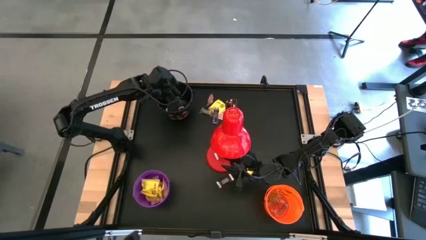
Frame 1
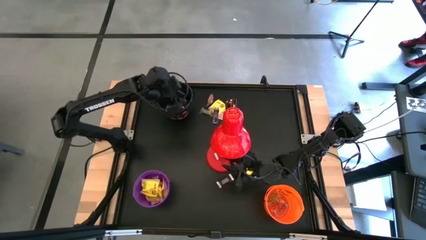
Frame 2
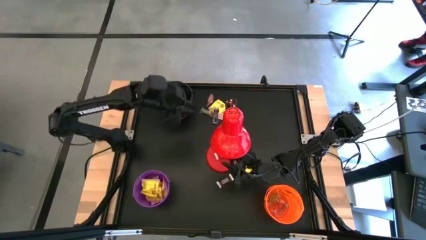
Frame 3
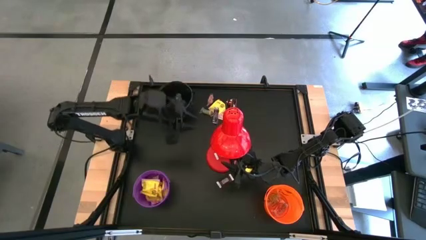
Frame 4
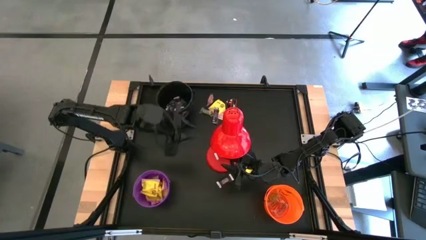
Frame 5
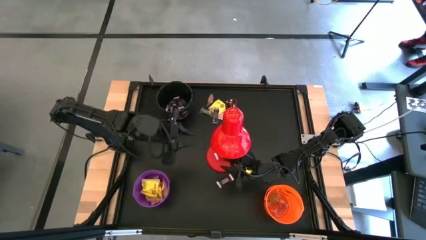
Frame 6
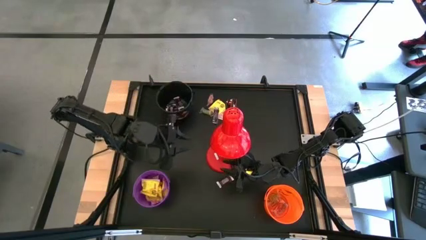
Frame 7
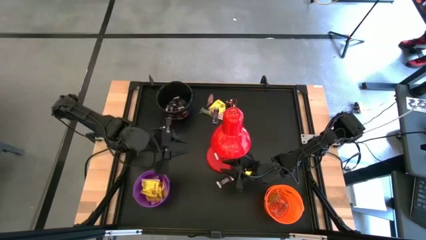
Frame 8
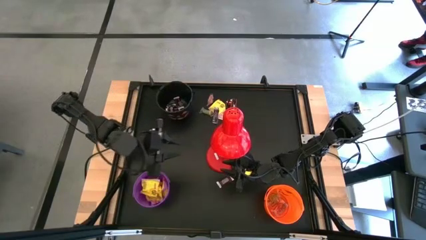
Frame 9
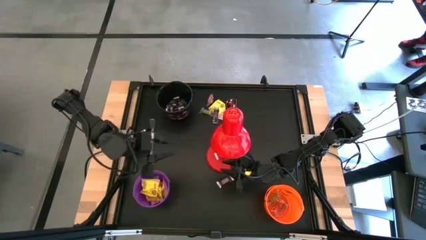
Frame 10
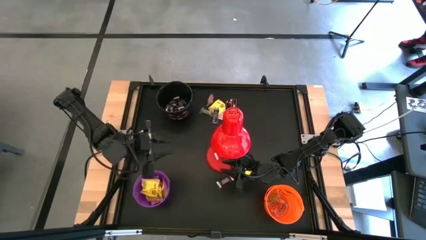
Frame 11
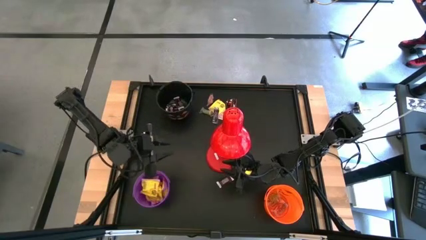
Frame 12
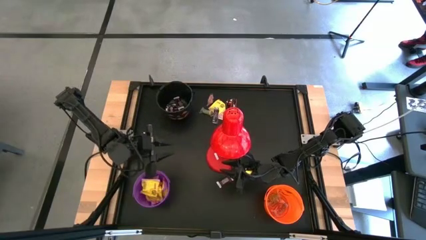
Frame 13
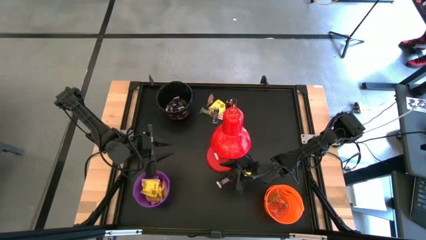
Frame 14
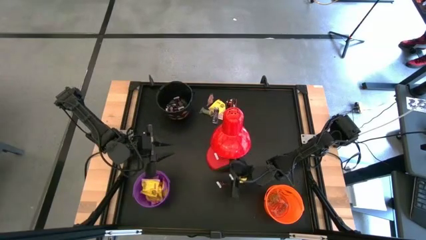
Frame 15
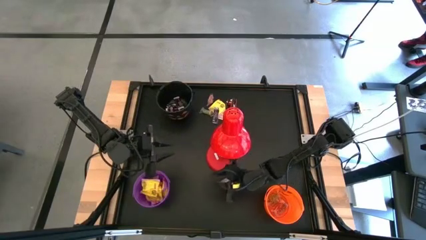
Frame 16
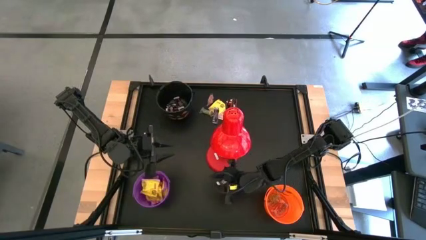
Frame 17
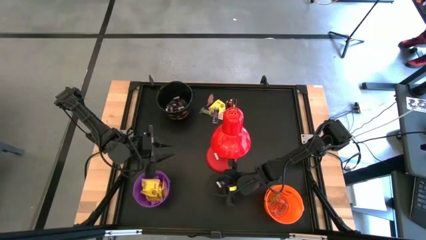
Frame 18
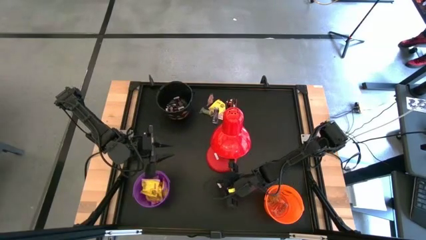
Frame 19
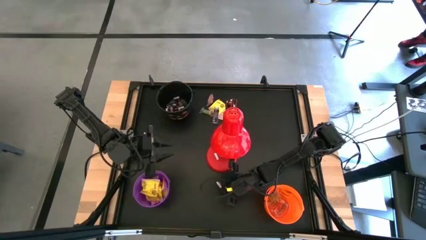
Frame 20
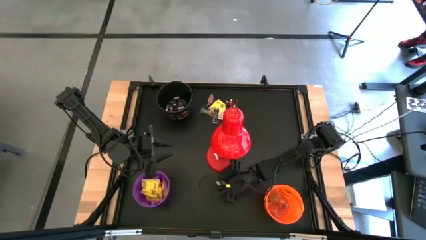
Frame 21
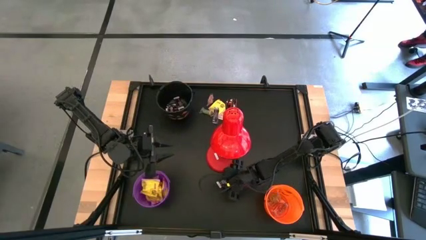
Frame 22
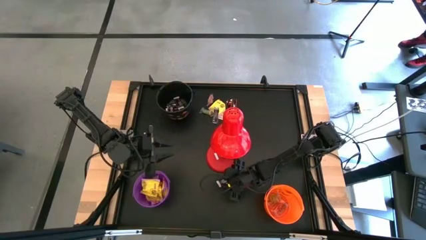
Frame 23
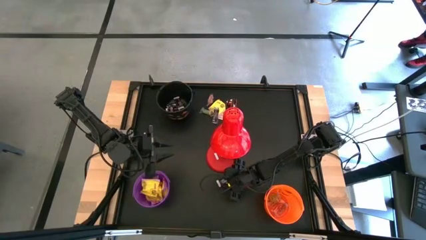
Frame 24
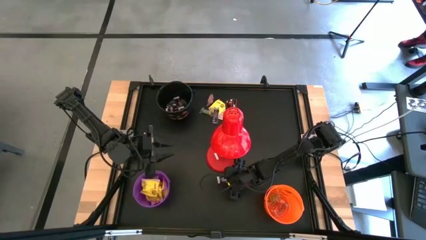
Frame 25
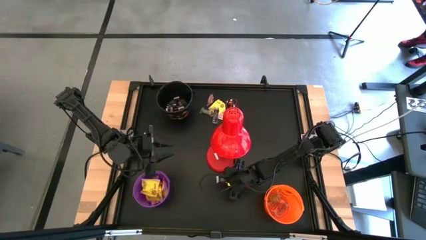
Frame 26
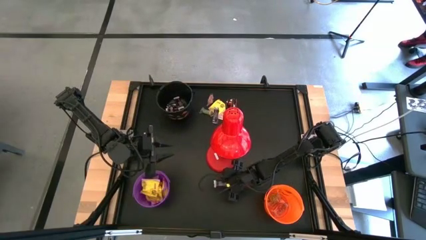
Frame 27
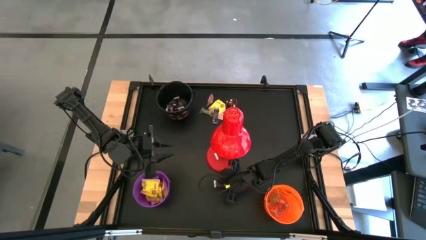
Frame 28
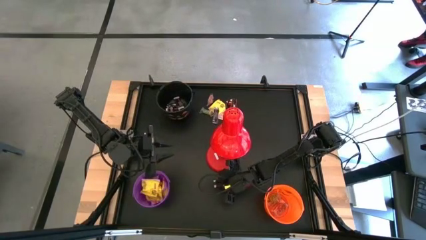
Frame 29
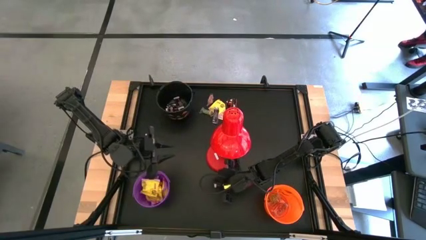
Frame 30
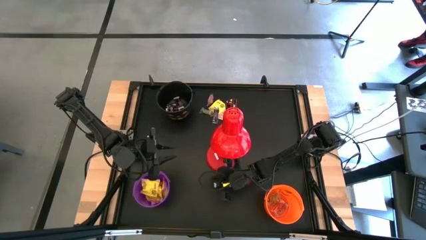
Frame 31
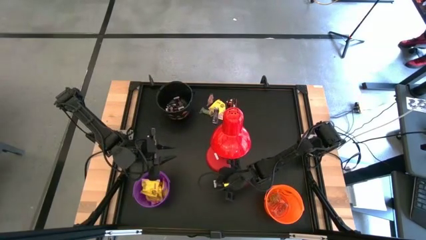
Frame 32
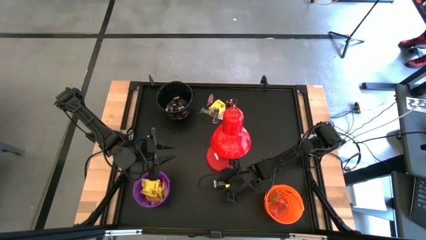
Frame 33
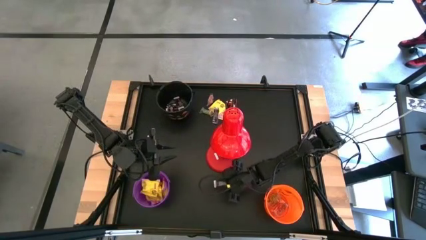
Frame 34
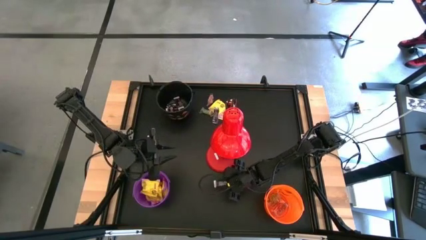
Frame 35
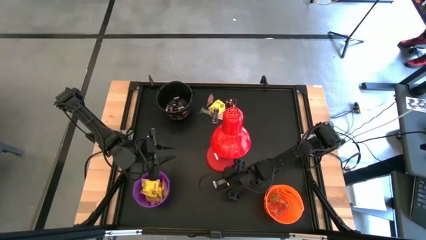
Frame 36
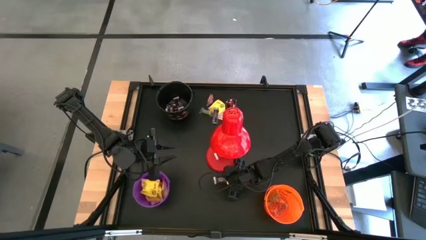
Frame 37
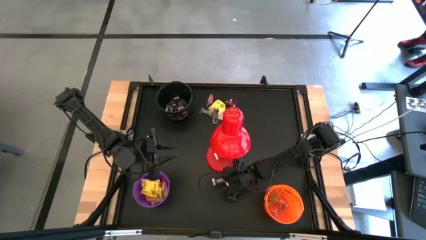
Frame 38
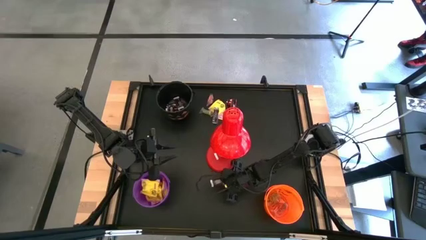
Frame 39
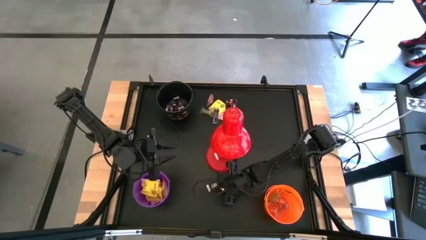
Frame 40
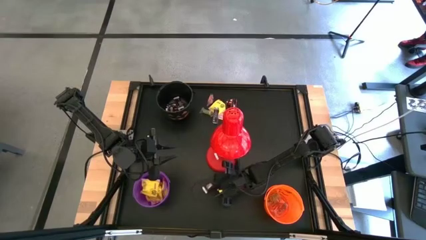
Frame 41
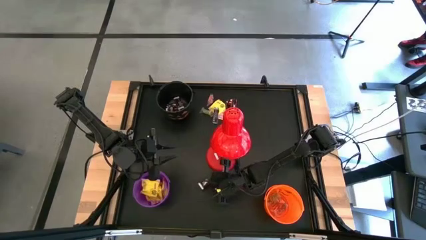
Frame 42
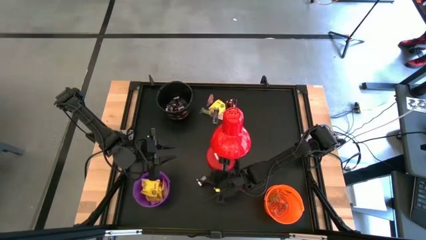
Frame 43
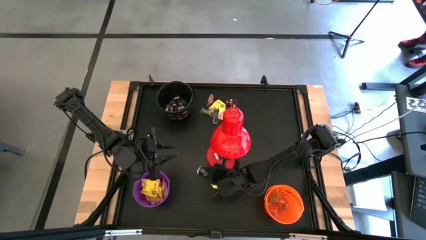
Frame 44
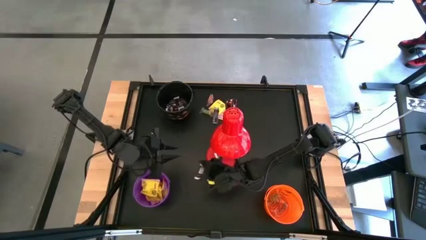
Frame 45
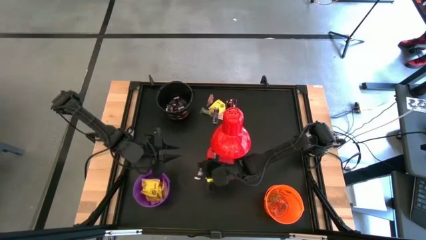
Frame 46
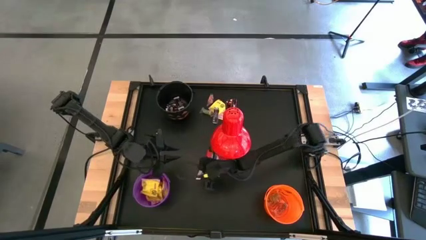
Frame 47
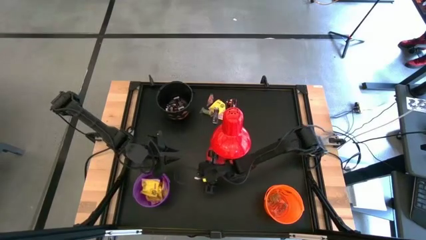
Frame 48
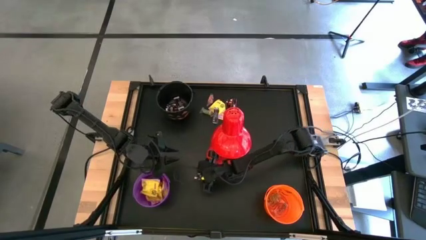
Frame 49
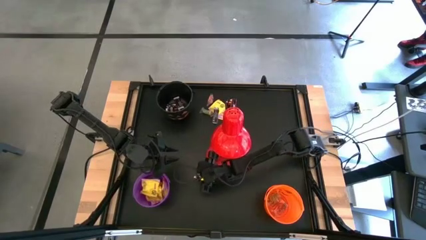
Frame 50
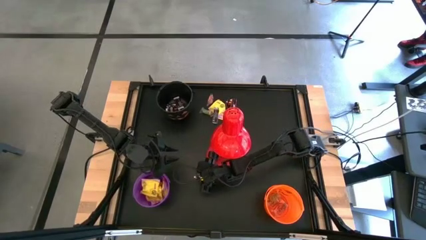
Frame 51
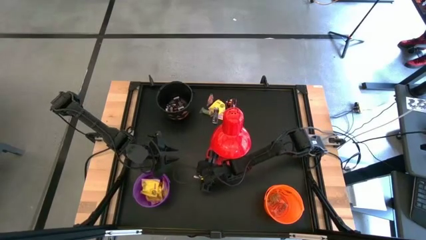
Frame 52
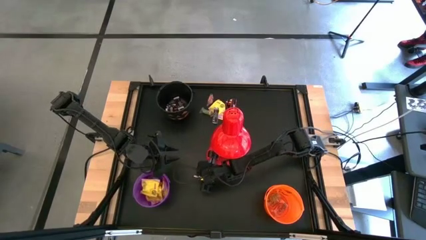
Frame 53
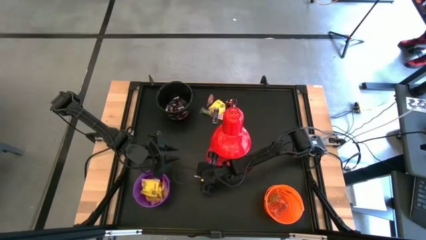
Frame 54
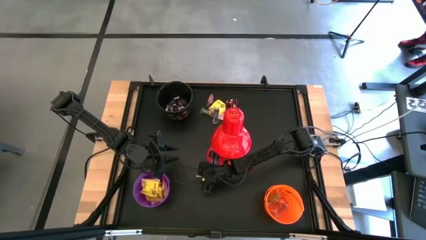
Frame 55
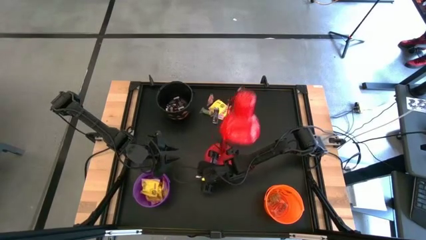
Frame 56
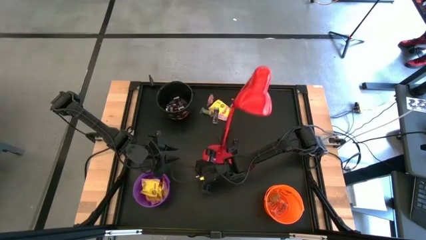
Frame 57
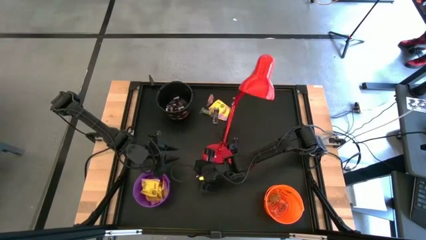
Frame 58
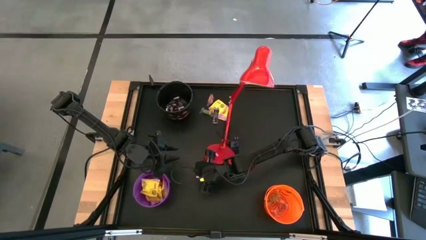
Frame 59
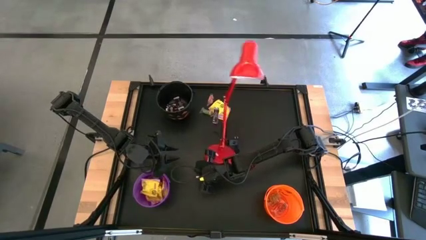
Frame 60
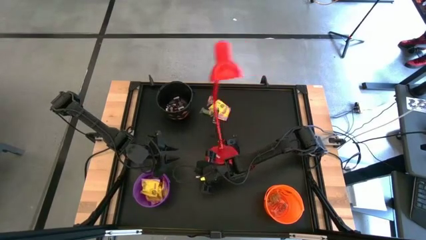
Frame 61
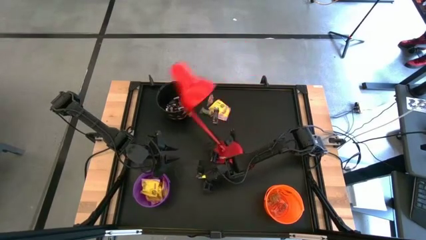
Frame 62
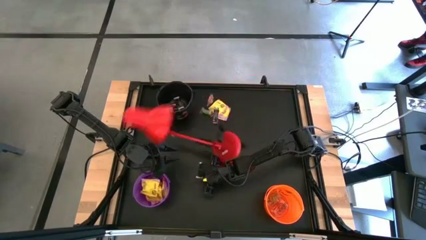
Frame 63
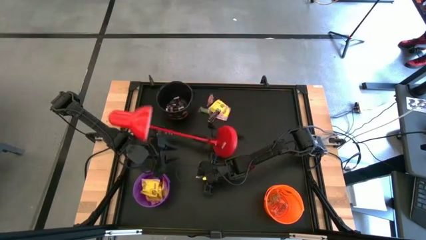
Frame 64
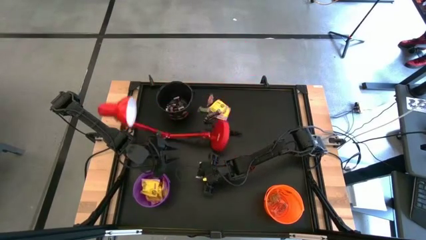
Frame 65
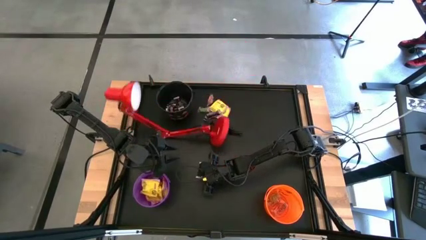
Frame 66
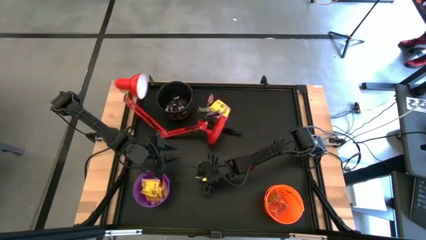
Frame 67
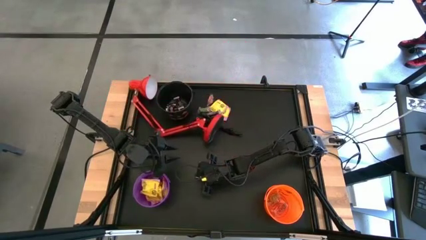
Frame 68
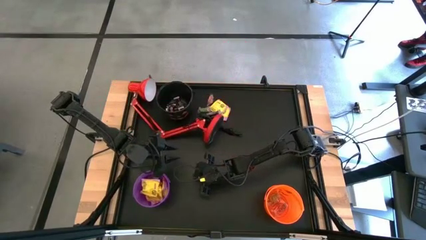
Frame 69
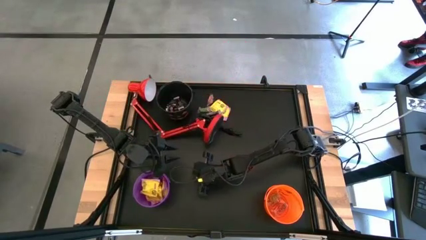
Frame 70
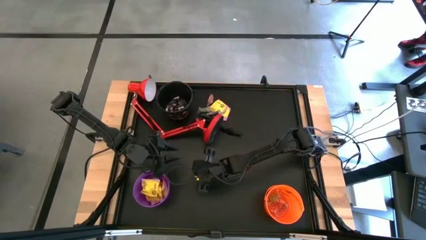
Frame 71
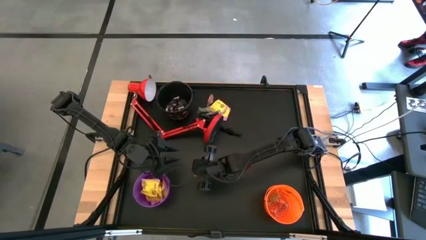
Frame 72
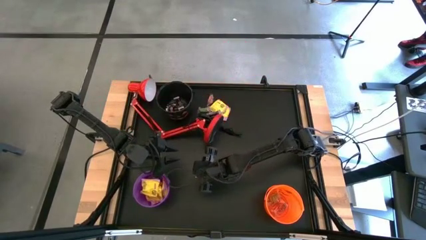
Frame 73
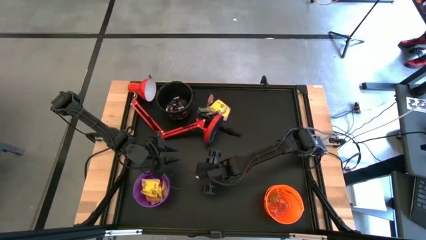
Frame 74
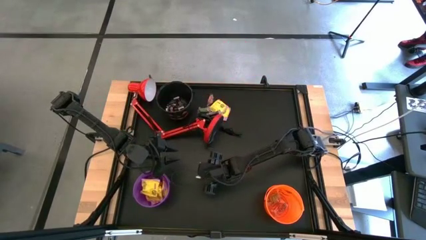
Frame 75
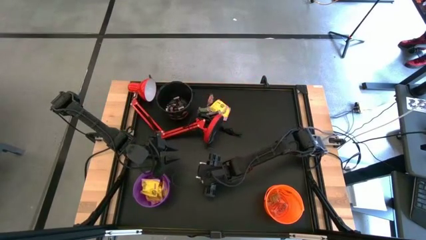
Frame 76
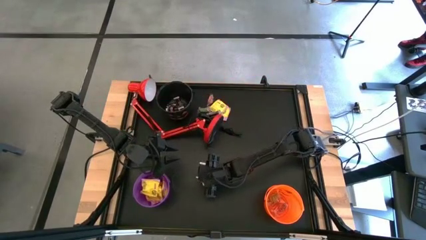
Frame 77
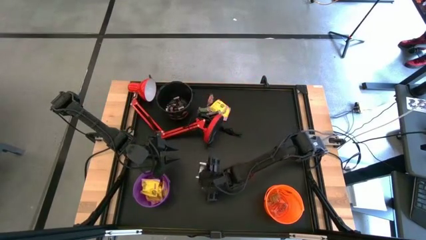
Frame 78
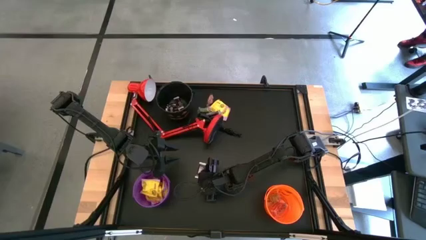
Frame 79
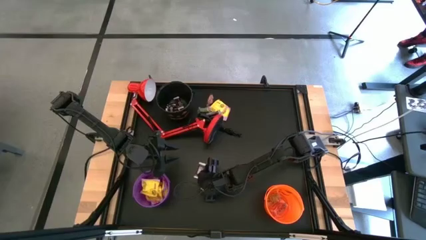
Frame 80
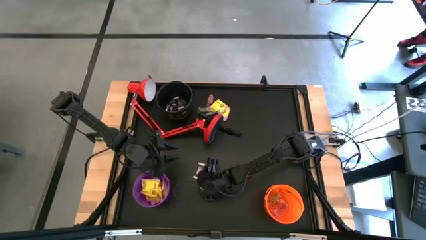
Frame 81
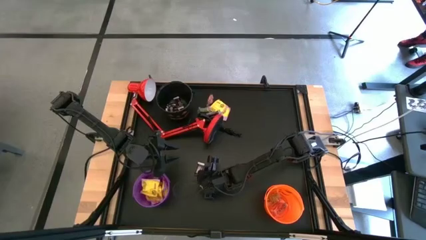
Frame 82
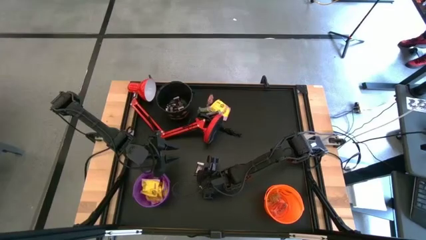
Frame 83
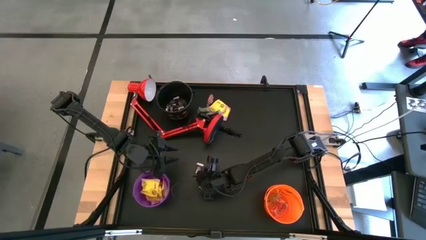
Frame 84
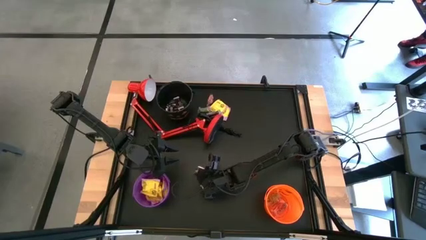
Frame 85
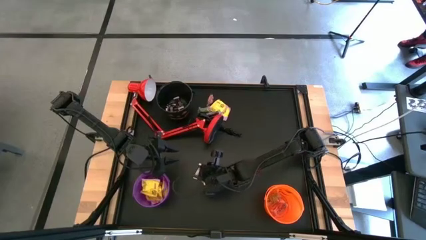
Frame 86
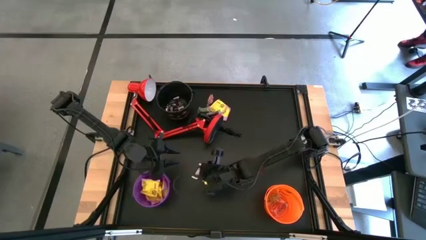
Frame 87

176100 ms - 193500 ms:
Task: Organize candy in baskets
Put the brown chocolate bar into the black bucket
